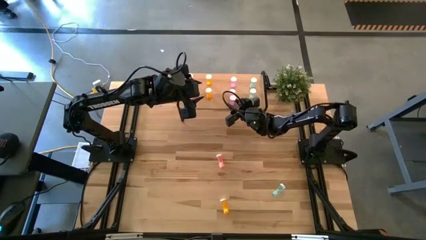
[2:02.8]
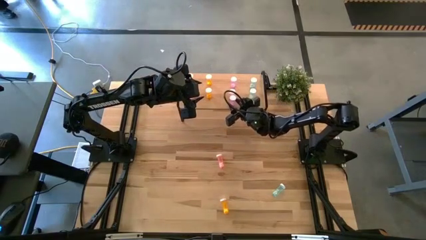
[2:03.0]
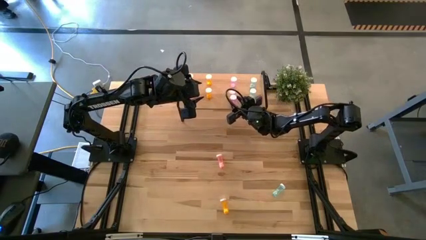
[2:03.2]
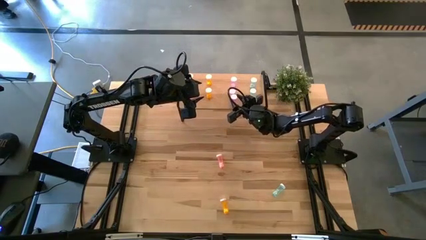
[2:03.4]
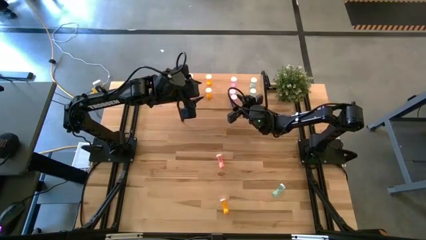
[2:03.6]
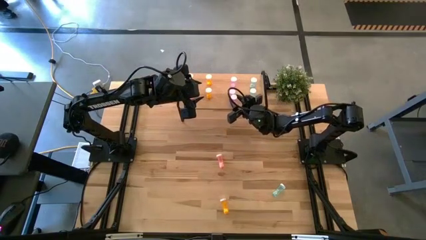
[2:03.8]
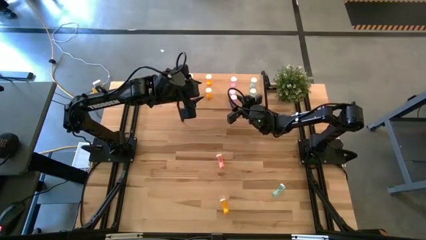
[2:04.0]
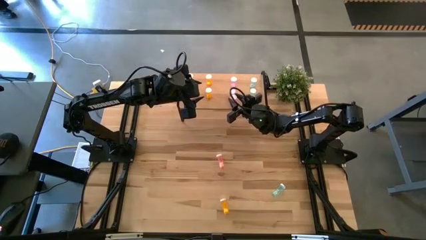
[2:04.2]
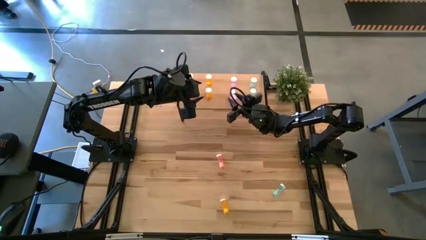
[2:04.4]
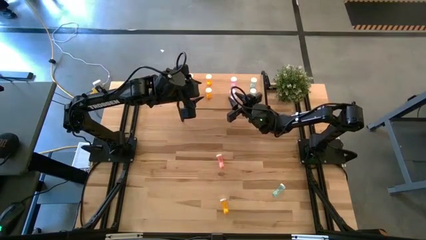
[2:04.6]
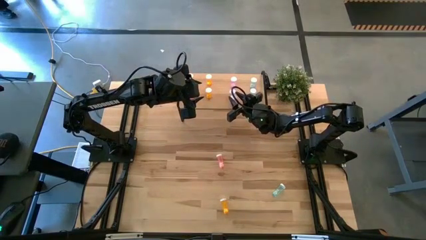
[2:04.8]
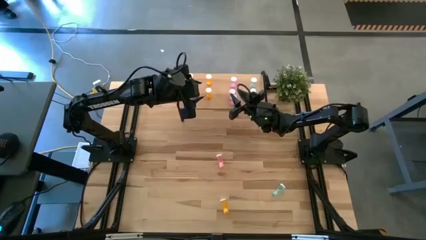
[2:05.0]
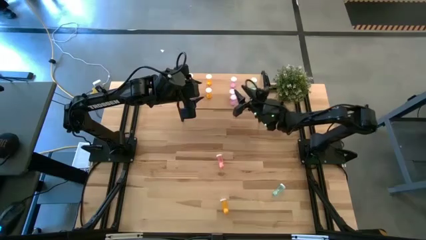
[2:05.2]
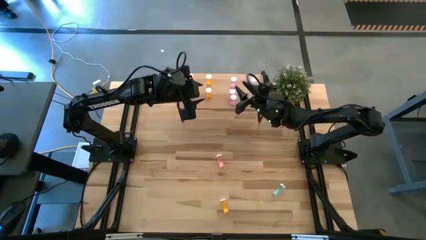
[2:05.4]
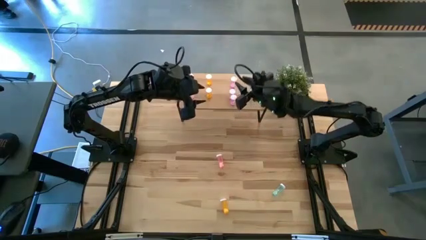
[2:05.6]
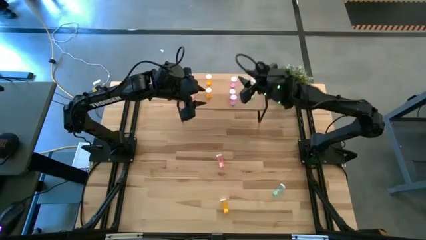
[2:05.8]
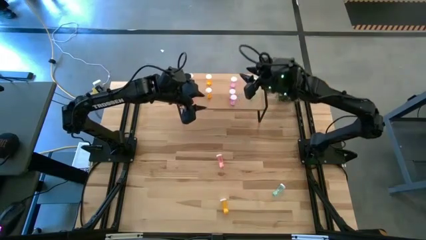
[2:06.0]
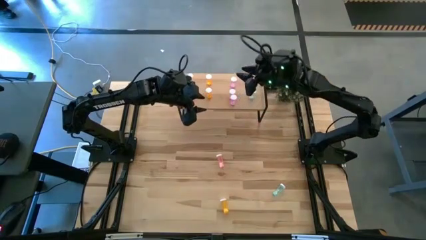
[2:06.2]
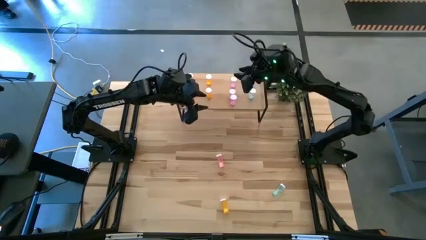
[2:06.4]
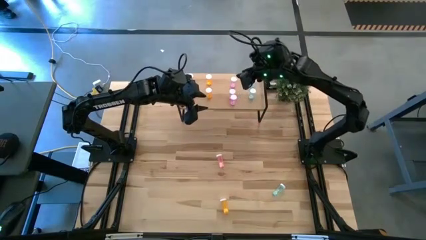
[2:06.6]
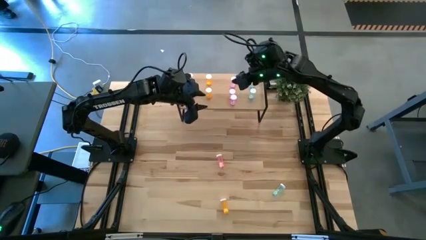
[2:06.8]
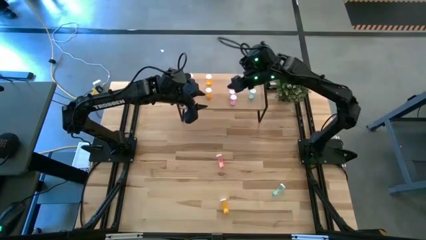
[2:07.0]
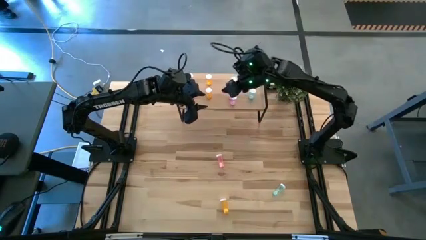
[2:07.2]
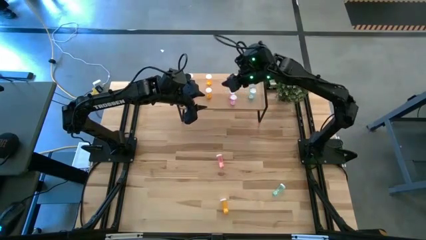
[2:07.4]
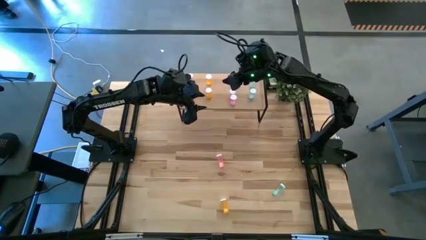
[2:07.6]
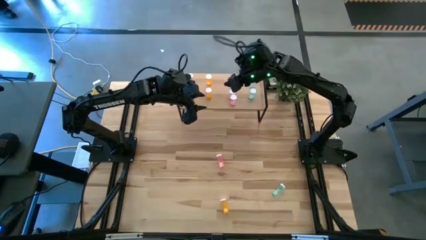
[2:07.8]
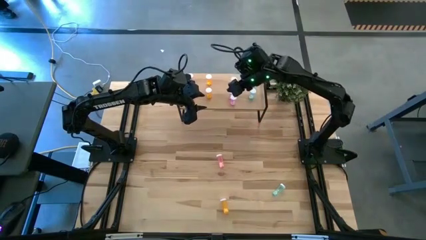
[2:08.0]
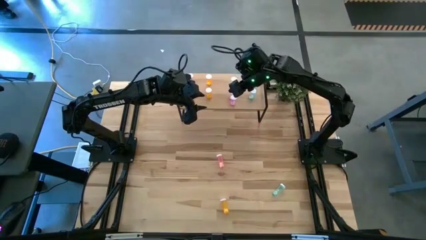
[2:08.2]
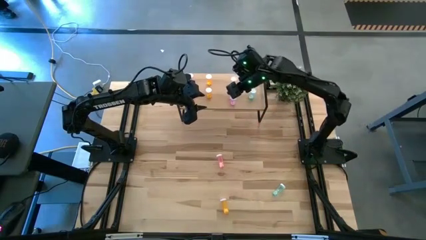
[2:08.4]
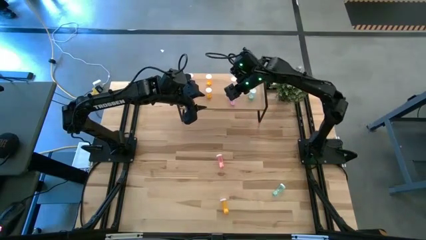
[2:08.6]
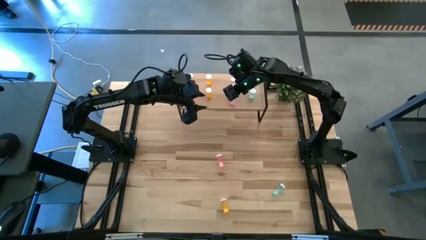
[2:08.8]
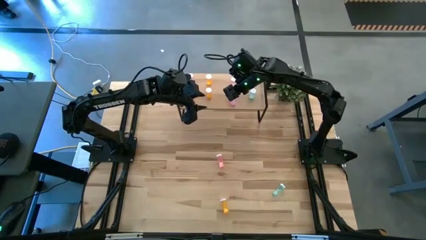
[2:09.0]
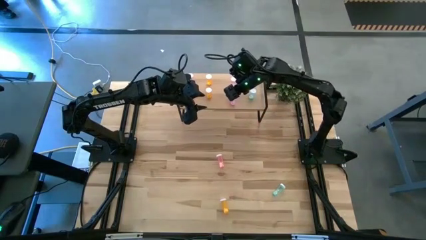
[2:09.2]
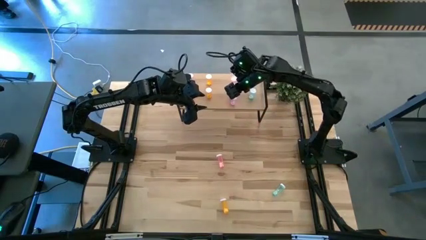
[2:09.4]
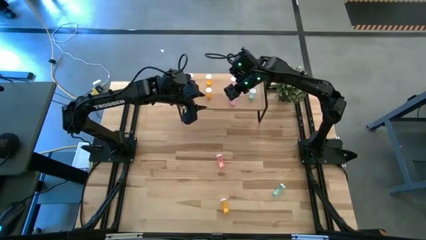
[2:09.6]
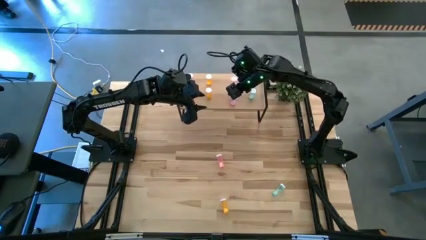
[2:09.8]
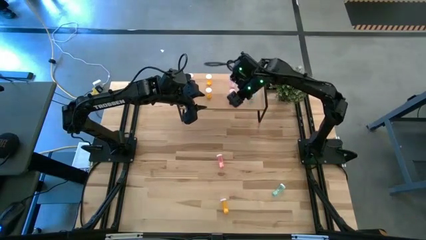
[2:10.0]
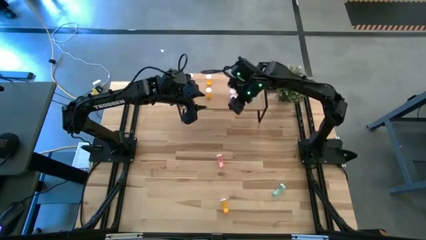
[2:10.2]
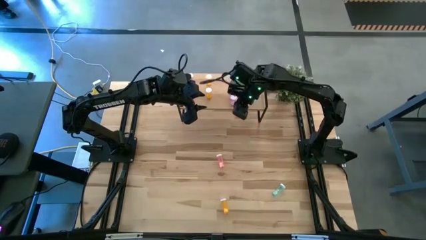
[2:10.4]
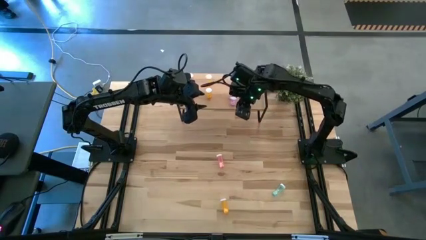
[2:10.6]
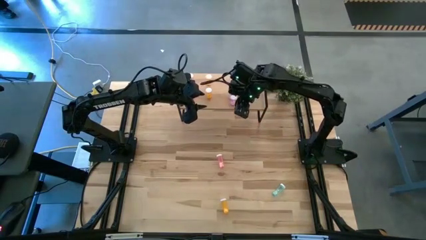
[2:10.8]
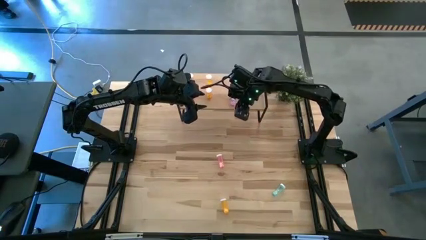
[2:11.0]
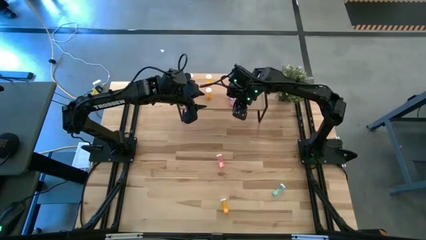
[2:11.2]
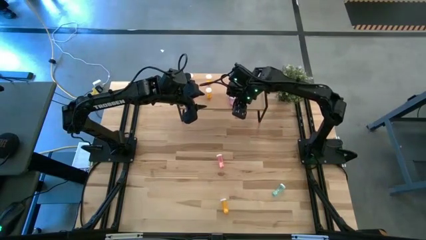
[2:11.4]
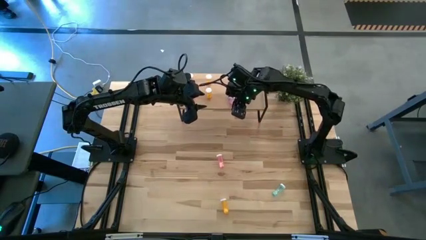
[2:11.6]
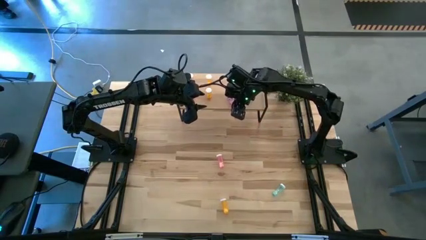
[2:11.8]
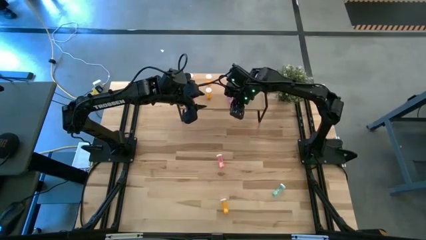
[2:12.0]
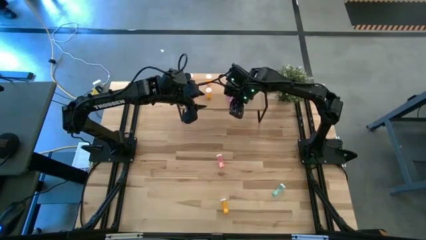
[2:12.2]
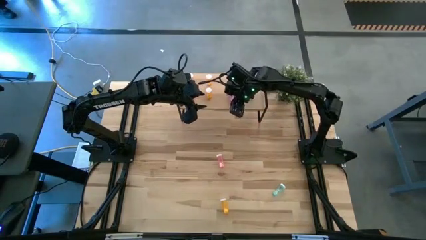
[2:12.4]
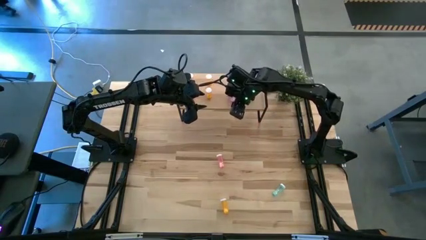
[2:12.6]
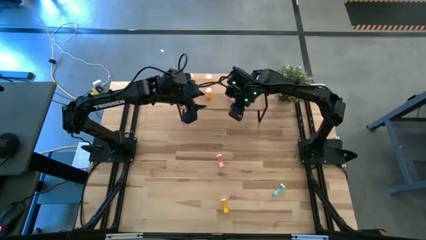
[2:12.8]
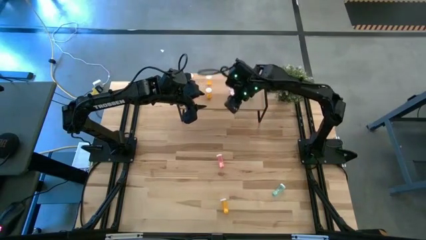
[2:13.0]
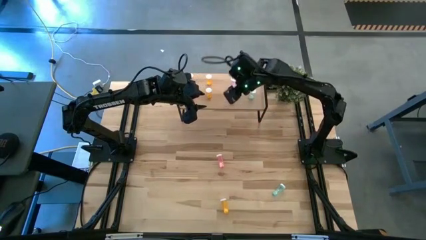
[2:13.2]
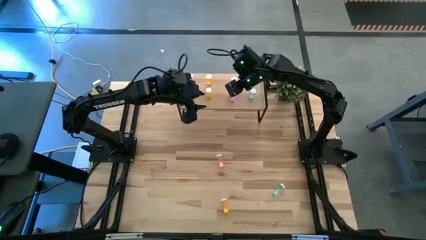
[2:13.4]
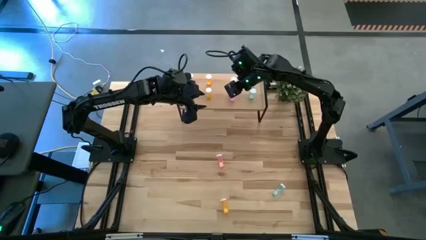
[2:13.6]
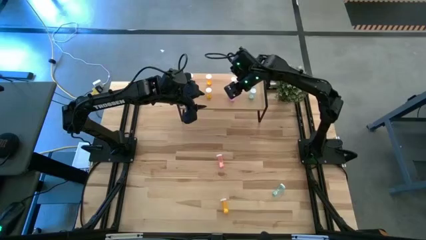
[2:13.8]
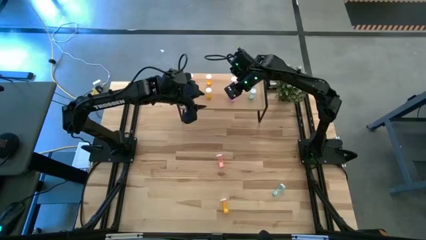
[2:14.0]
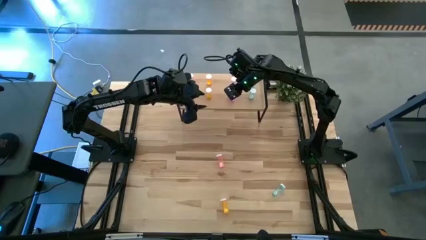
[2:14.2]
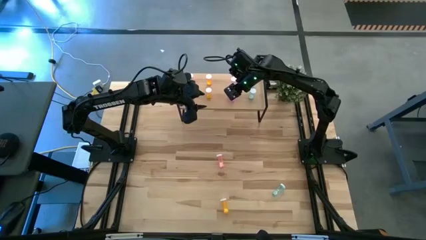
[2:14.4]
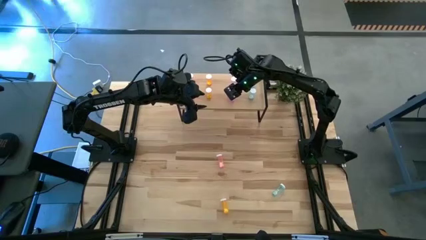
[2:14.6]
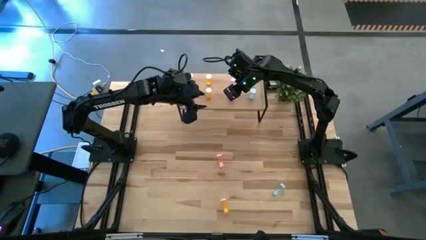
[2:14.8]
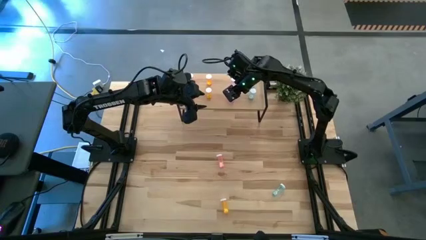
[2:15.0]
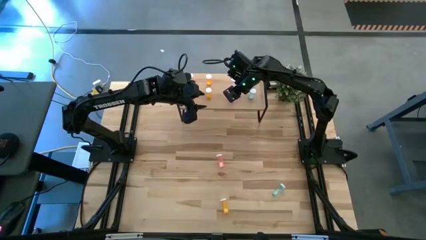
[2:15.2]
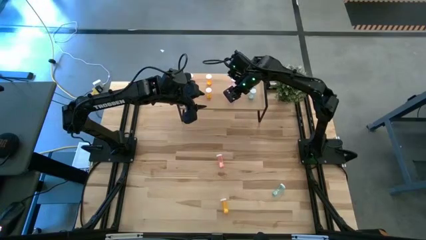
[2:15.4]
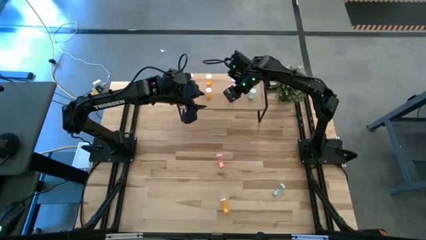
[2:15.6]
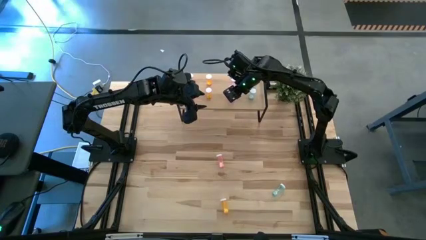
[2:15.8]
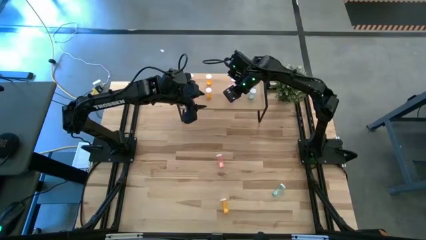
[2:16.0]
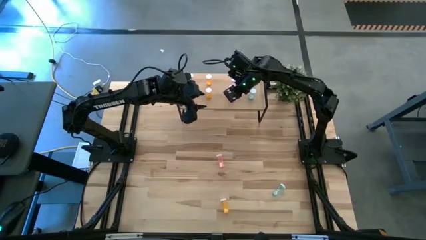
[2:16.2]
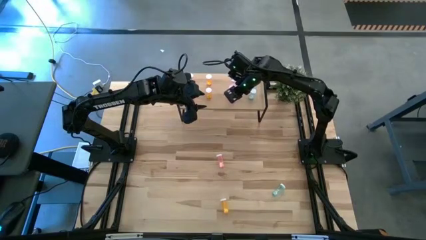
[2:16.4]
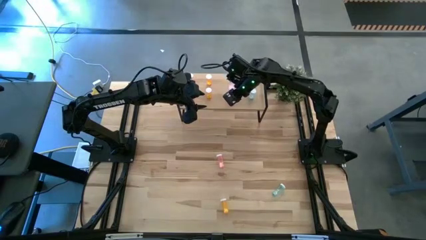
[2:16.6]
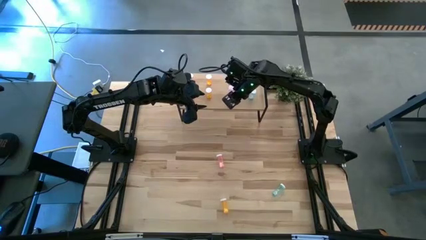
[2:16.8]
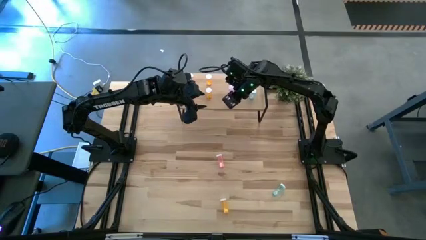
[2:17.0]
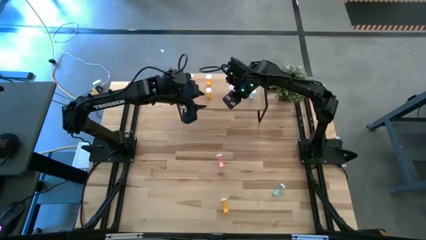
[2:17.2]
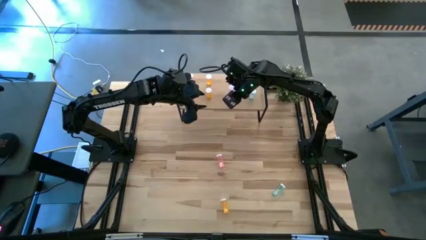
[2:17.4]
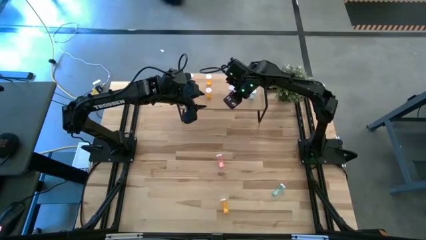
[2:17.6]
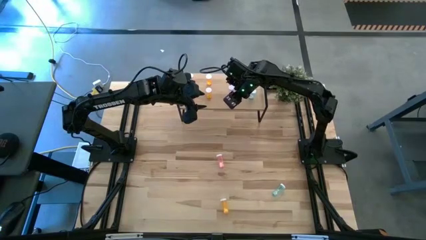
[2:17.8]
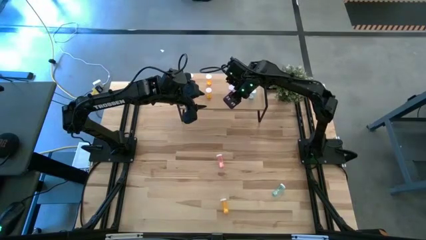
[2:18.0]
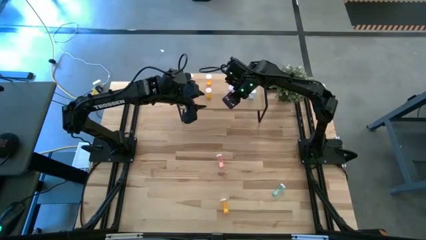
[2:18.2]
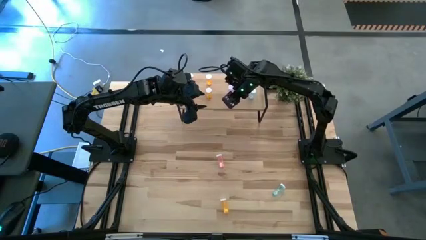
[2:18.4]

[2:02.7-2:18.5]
Task: Pick and place medicine bottles onto shelf by color
Adjust the purple pill bottles on the shelf

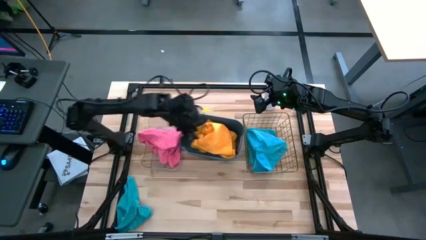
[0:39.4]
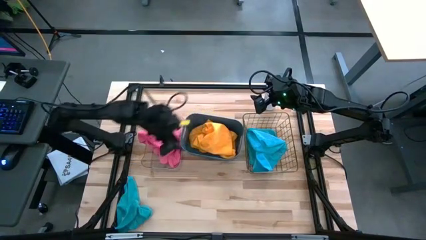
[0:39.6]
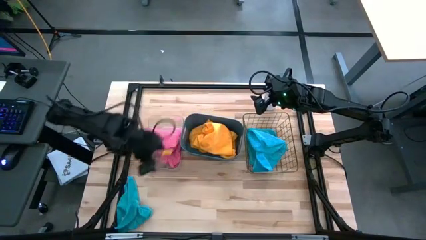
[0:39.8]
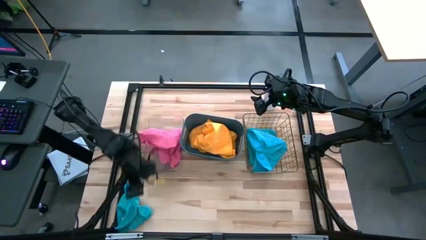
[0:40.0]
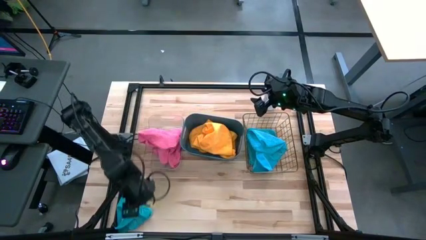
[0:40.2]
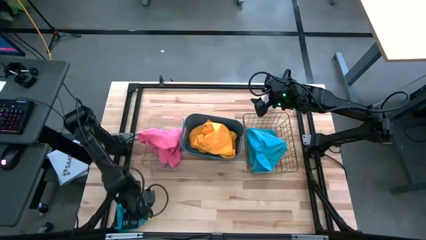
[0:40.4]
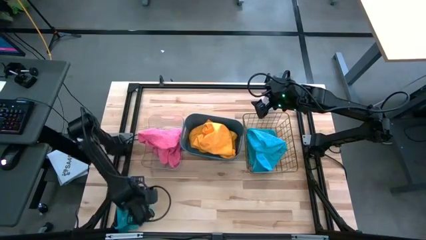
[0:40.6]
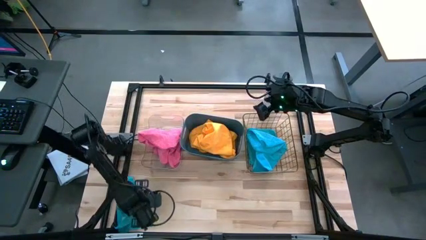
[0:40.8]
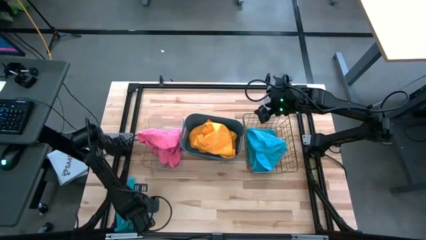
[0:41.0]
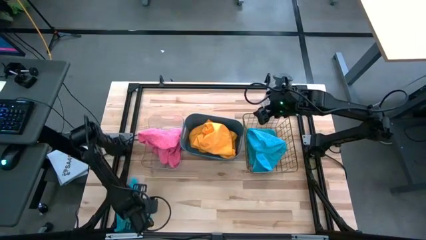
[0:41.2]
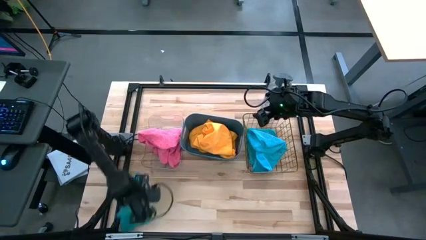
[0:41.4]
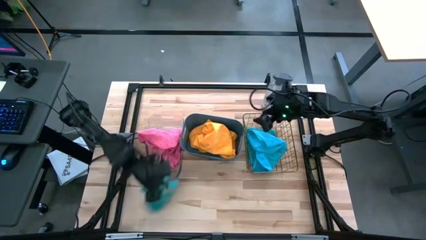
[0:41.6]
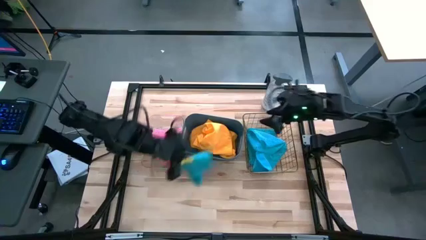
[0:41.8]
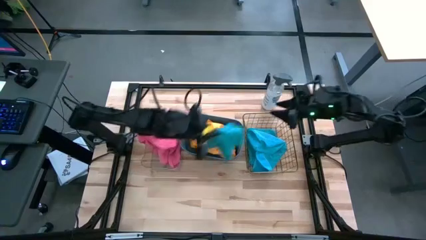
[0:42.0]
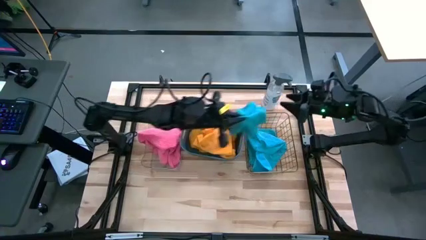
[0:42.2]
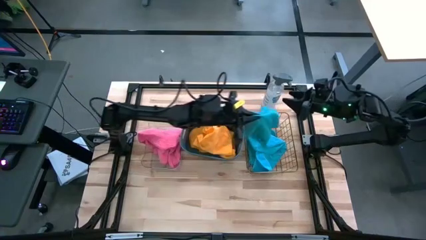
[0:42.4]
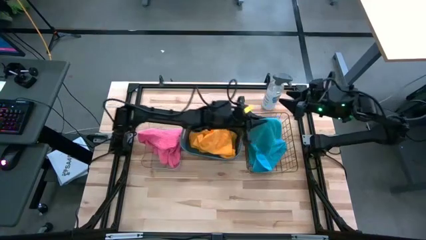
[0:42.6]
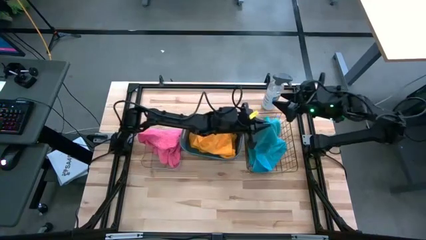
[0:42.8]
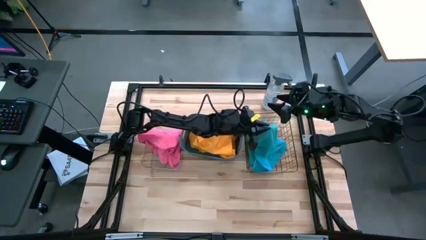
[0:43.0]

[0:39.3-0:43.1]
Task: Sort microfiber towel by color & place in baskets
Put the blue microfiber cloth into the wire basket
